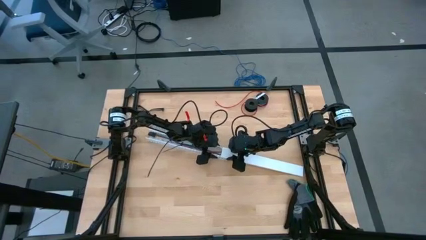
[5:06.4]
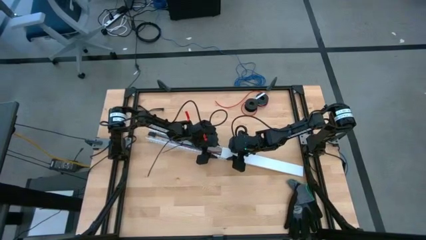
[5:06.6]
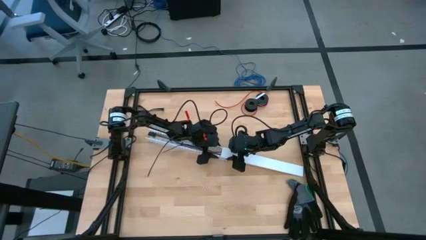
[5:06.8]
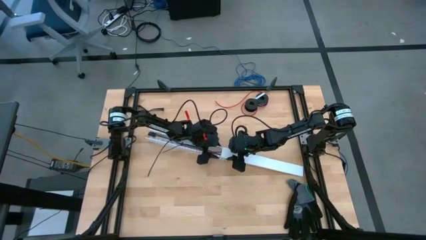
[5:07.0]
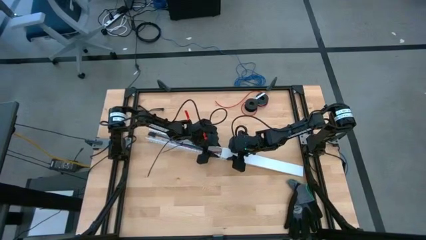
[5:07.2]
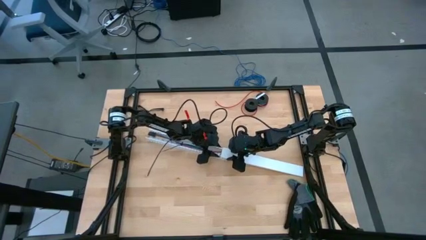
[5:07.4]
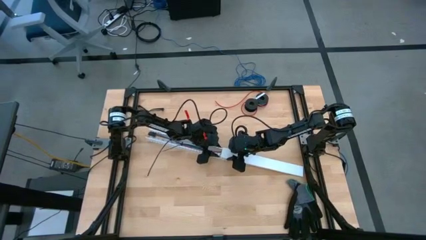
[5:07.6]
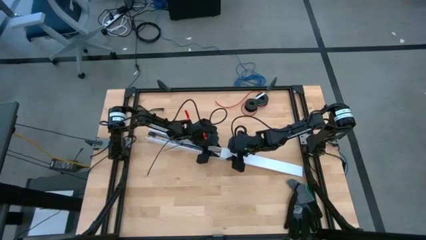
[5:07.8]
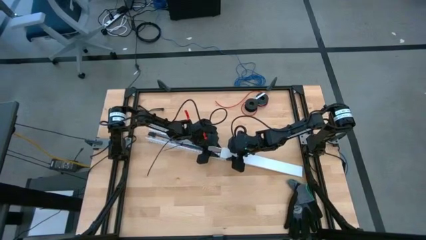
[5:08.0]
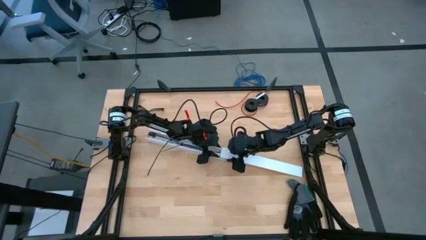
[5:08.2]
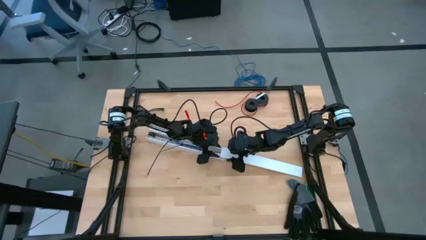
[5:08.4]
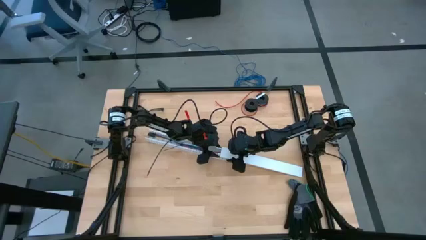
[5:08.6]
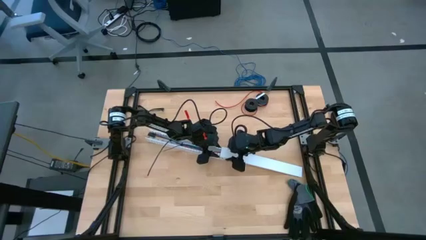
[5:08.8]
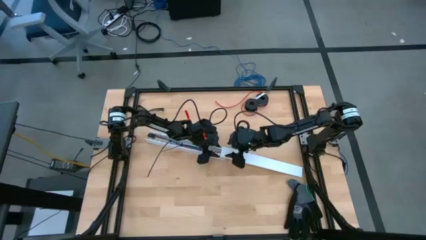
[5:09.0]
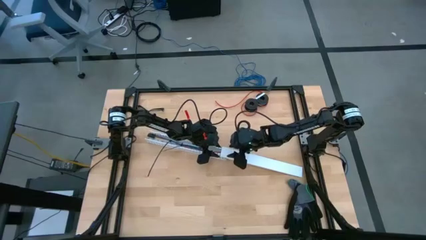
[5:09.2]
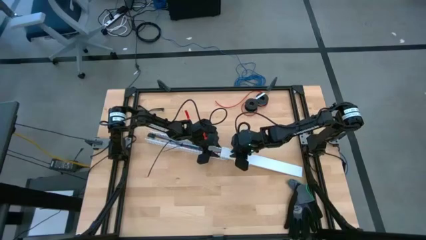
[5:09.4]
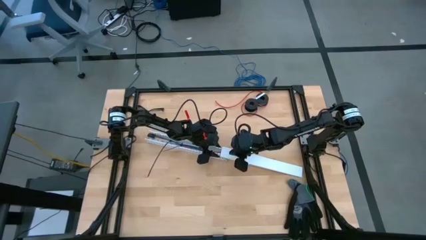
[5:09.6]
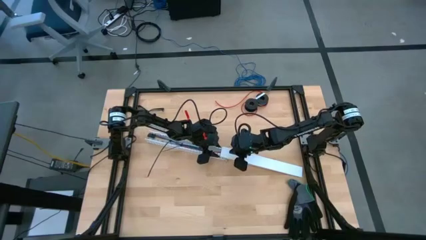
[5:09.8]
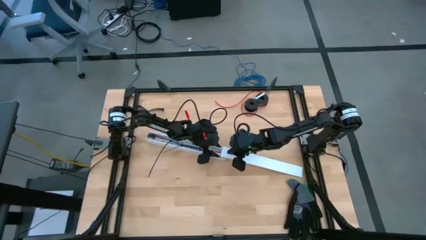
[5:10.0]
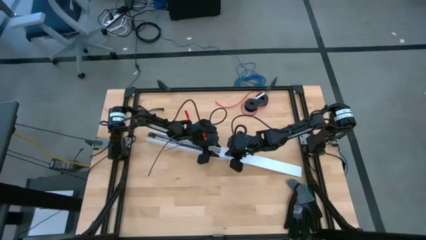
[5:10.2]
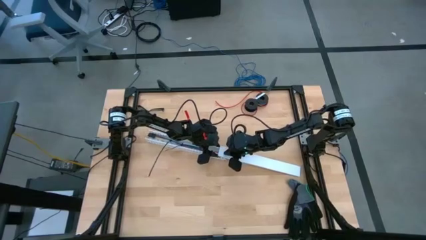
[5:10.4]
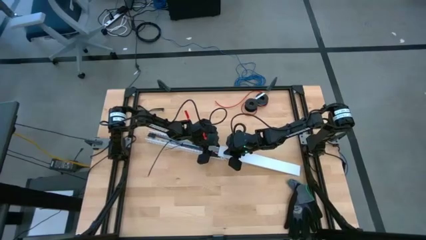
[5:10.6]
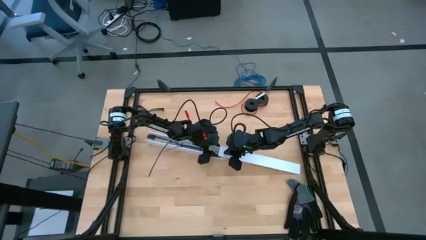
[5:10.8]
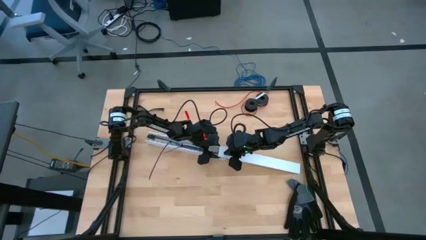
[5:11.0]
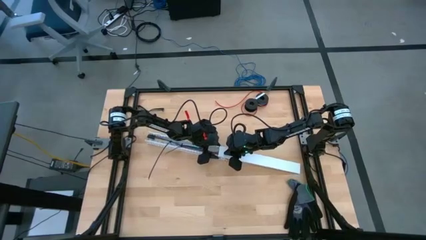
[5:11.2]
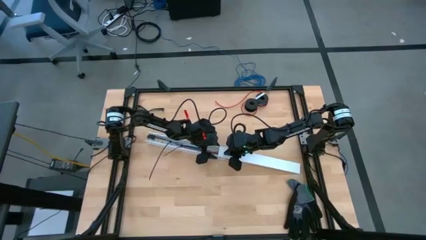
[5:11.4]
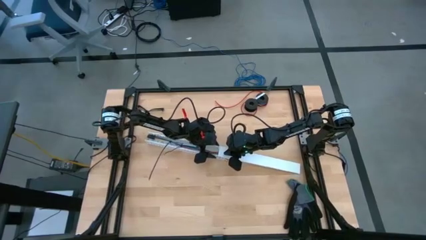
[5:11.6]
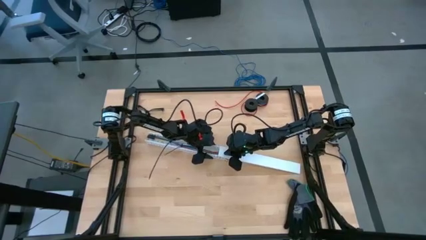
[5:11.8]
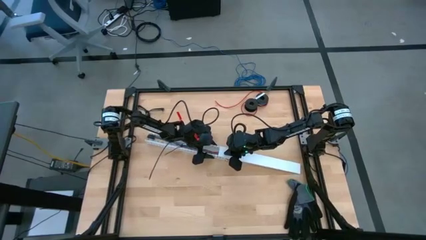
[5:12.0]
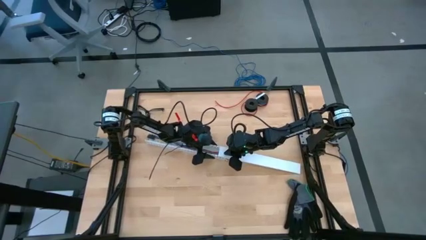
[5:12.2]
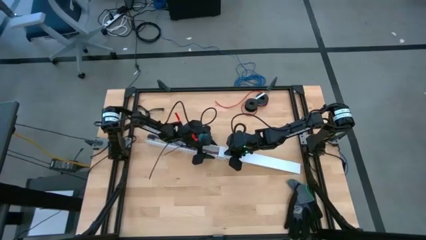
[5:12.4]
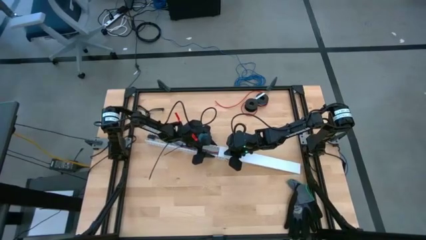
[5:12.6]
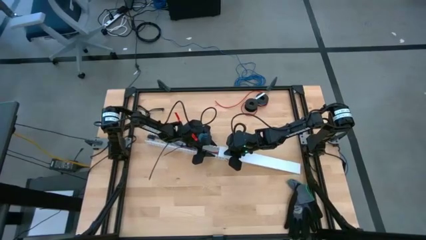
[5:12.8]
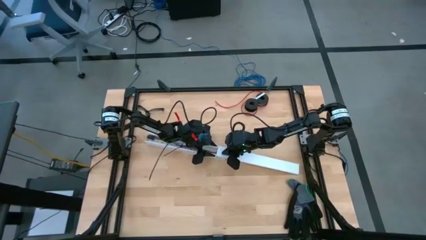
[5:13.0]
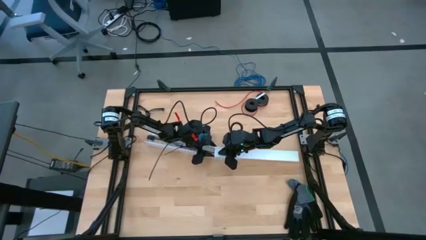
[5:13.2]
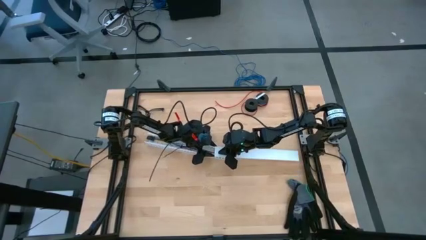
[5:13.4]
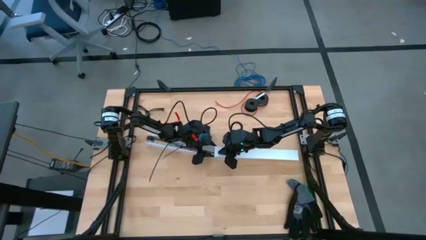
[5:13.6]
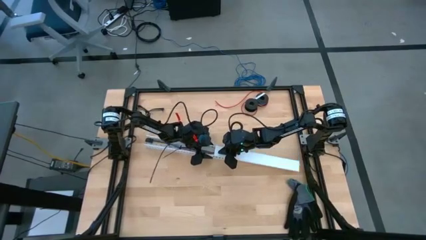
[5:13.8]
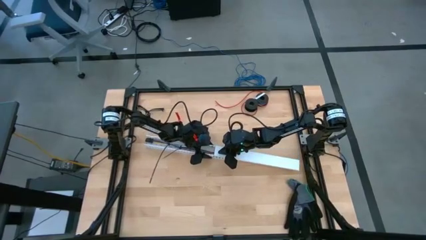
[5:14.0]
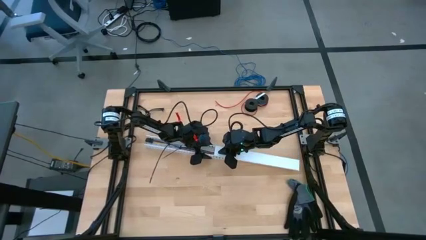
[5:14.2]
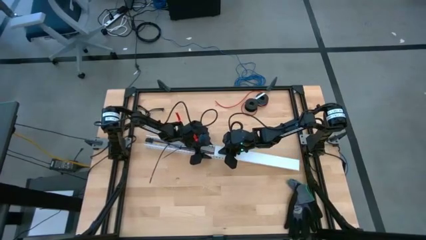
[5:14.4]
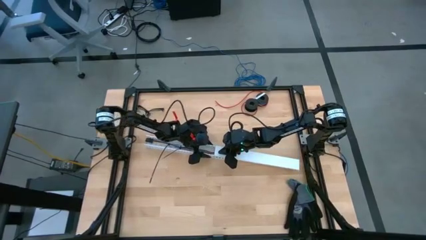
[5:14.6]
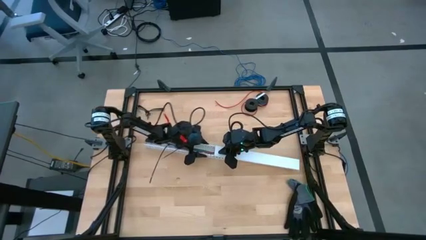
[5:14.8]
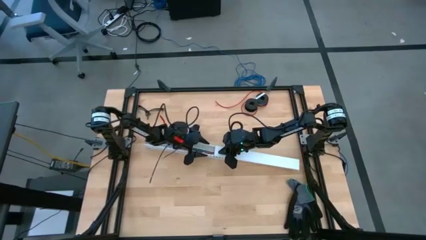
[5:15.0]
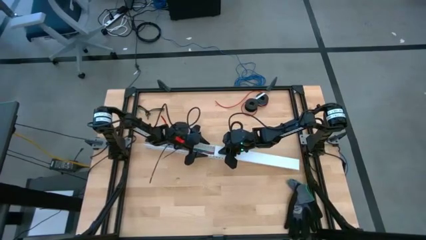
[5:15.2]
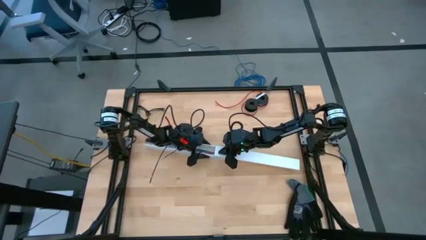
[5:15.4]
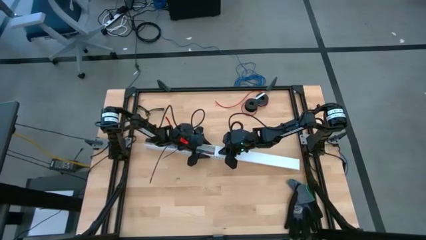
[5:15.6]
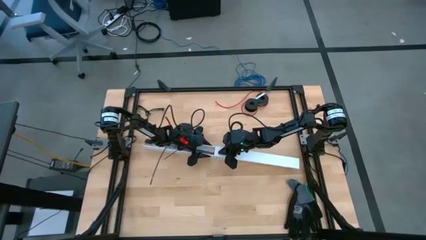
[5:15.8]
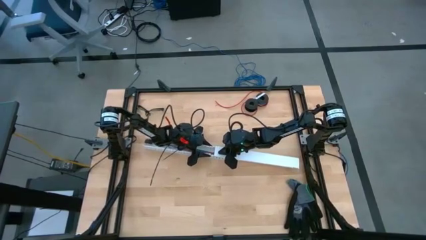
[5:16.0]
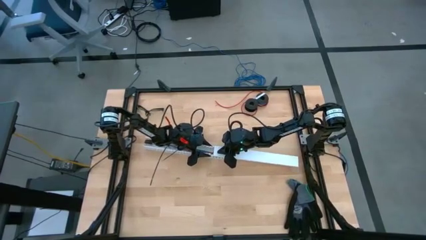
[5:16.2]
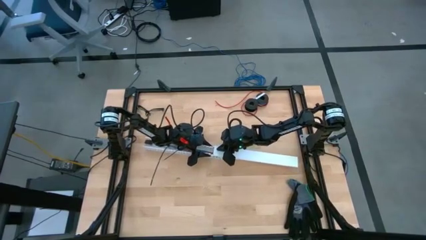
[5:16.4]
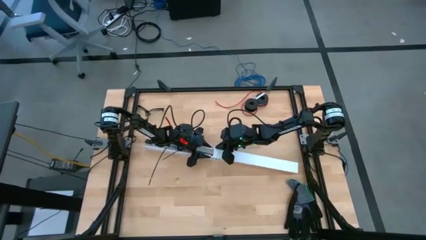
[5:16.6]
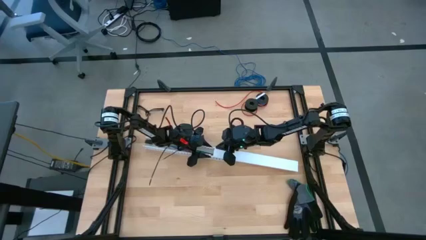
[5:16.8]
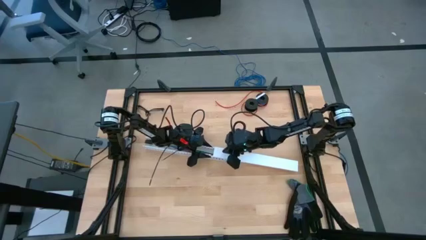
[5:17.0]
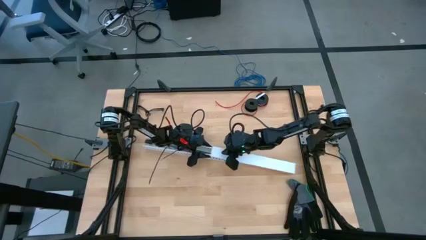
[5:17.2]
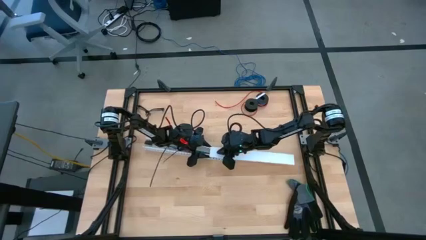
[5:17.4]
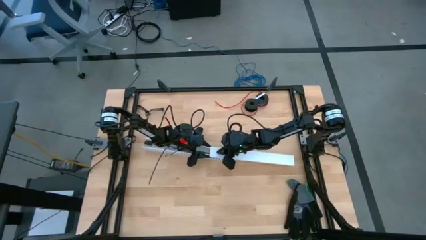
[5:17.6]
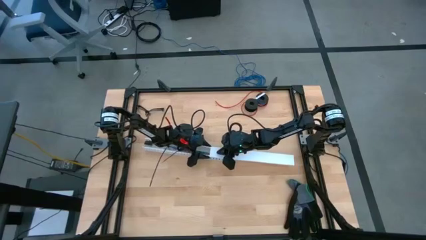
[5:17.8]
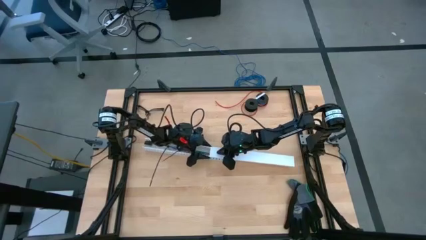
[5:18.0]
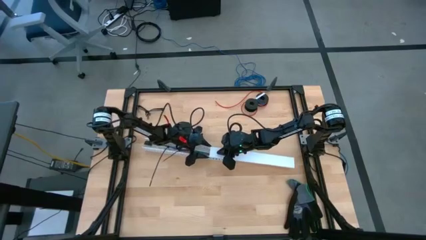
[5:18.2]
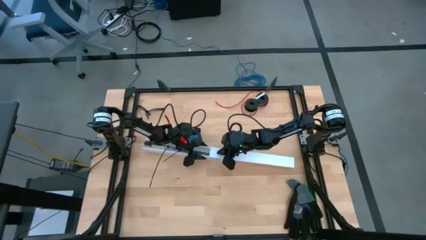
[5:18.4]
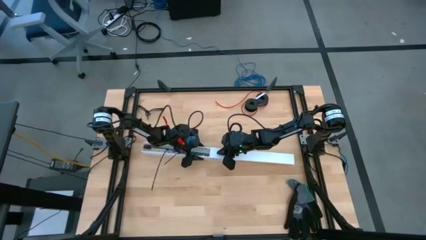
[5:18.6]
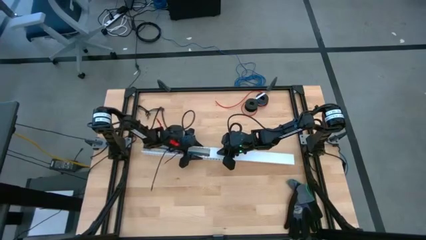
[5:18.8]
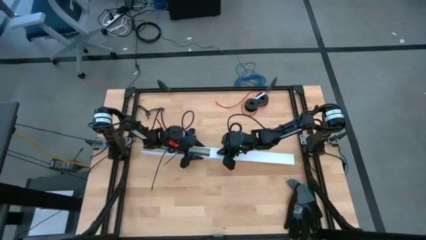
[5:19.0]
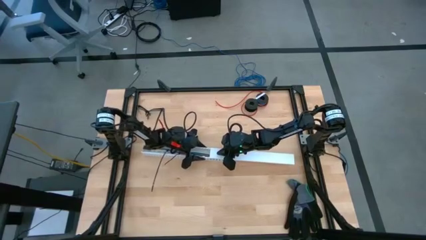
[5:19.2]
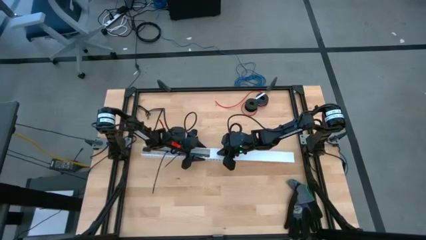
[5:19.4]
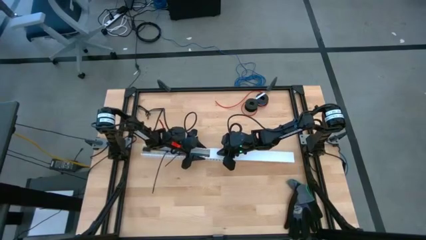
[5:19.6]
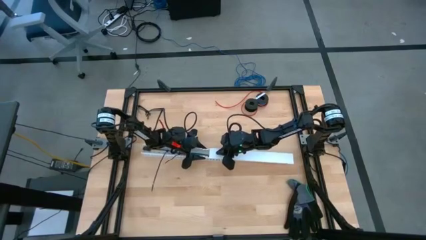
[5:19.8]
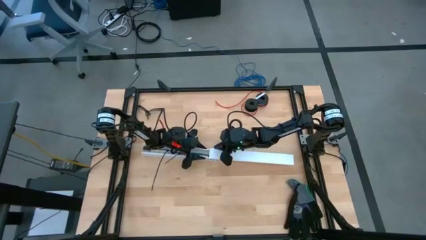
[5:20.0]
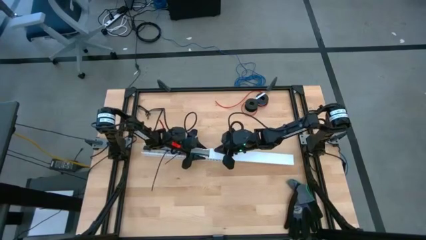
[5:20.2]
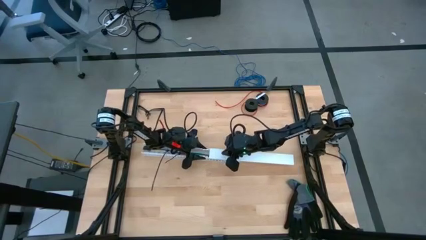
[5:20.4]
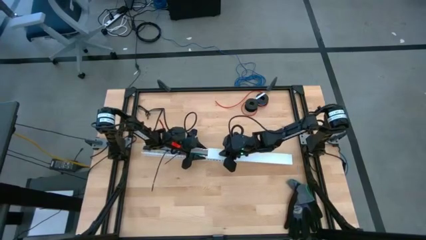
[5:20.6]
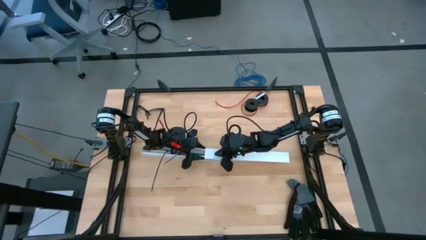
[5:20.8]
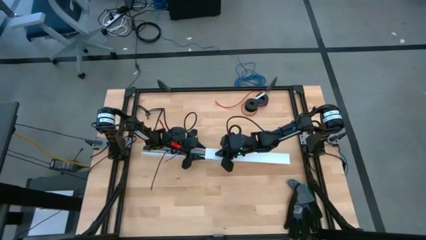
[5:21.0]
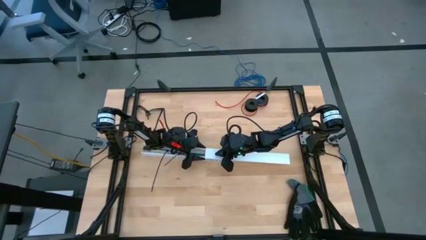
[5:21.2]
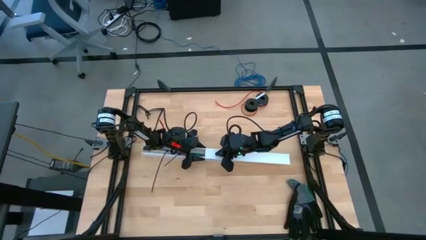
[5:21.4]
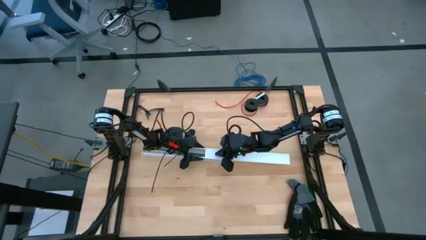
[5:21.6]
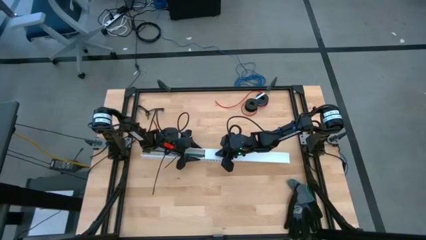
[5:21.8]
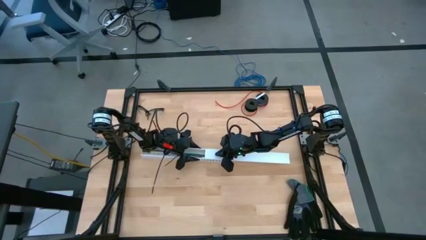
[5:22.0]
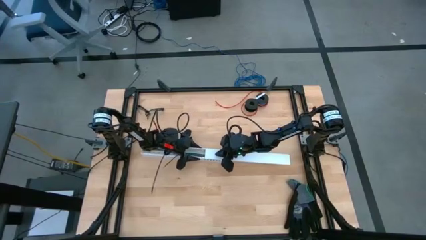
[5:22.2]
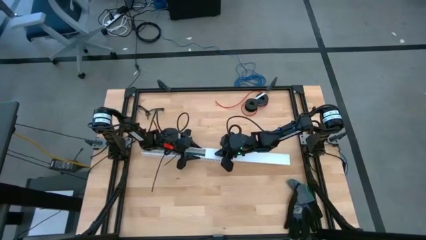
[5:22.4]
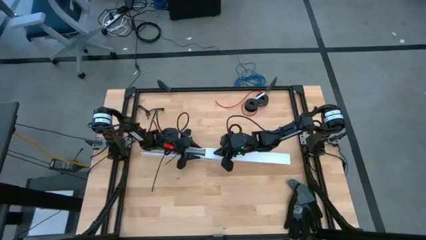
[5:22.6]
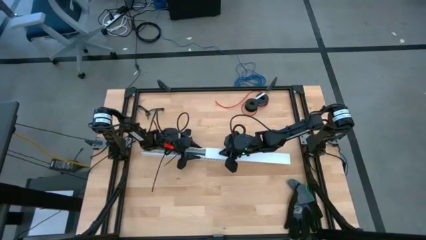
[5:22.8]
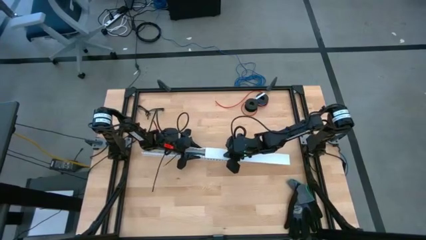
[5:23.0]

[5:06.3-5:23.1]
Task: Ziptie cables
Close the white cable duct
